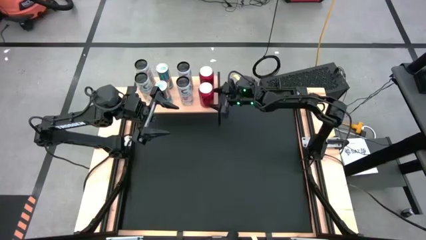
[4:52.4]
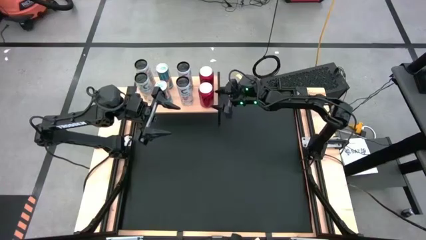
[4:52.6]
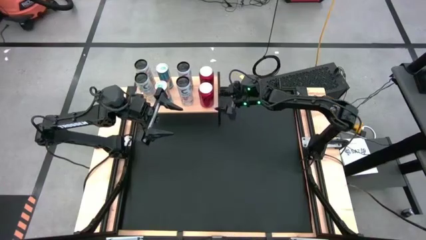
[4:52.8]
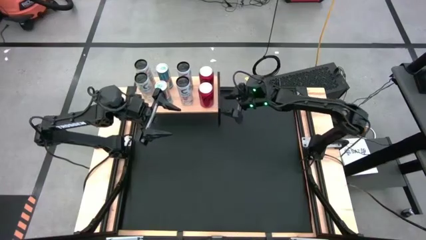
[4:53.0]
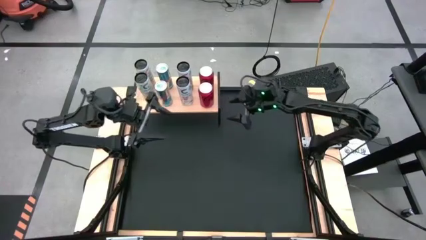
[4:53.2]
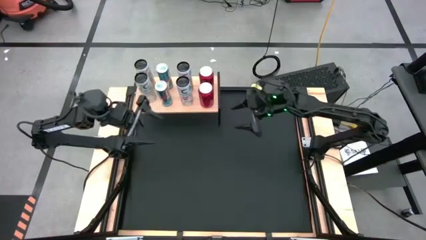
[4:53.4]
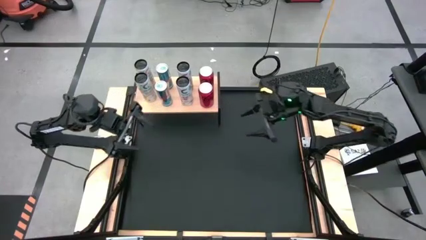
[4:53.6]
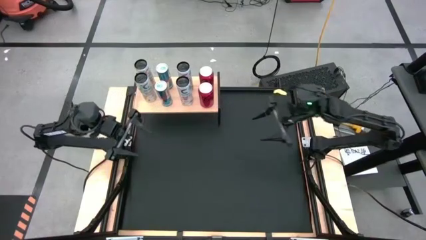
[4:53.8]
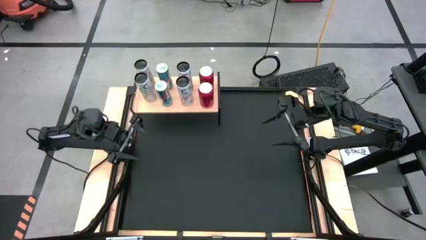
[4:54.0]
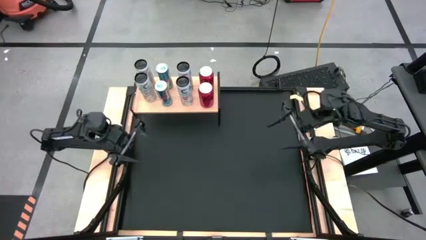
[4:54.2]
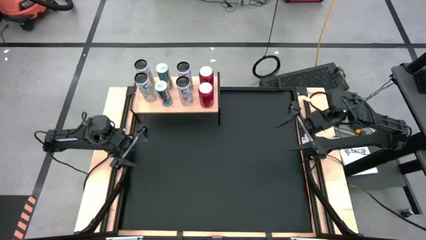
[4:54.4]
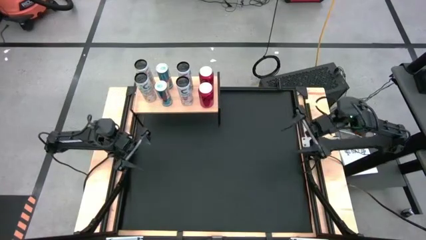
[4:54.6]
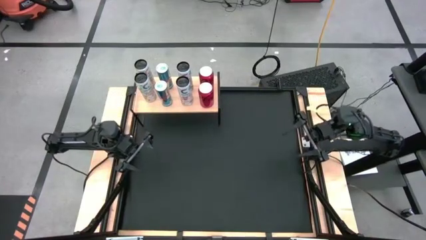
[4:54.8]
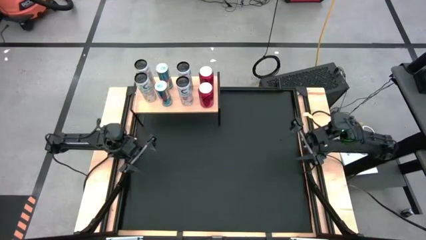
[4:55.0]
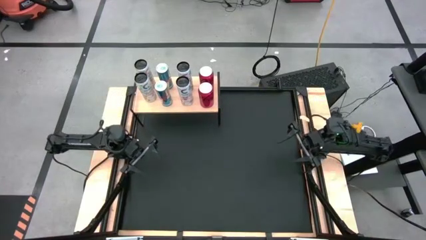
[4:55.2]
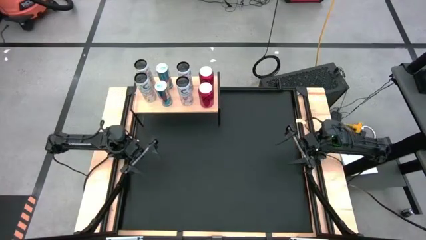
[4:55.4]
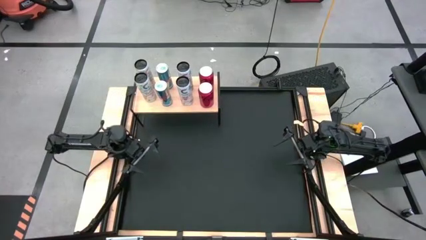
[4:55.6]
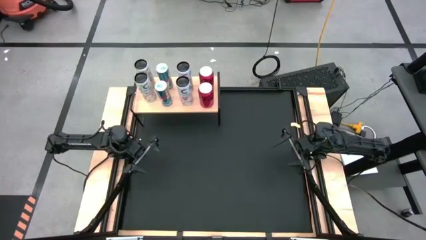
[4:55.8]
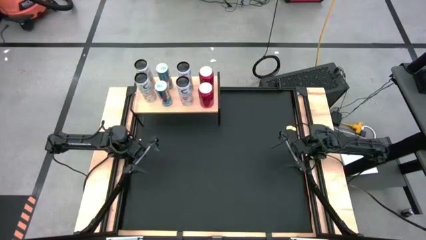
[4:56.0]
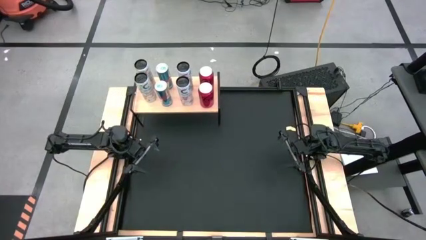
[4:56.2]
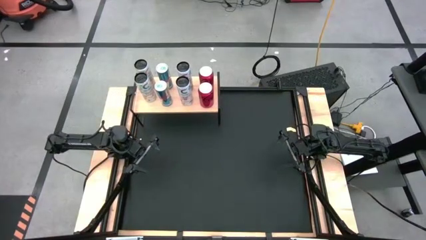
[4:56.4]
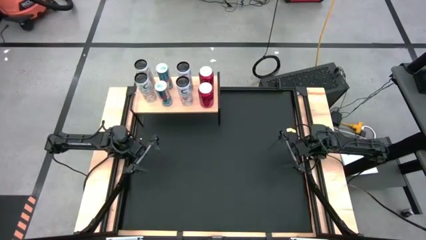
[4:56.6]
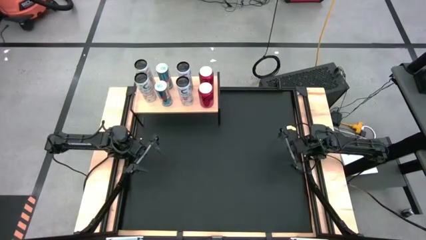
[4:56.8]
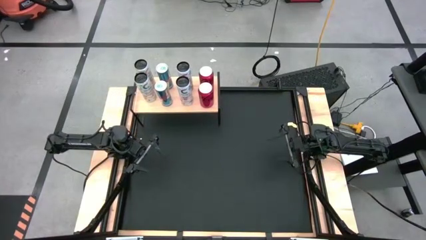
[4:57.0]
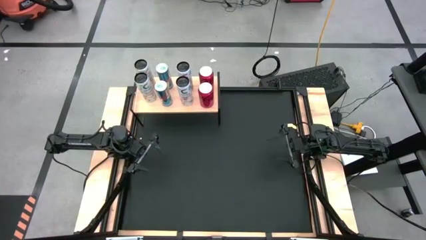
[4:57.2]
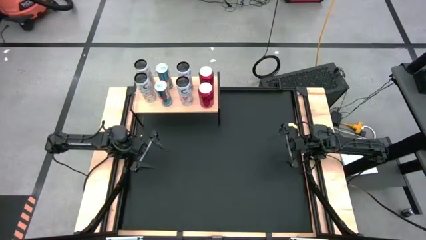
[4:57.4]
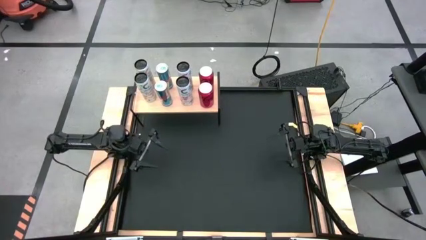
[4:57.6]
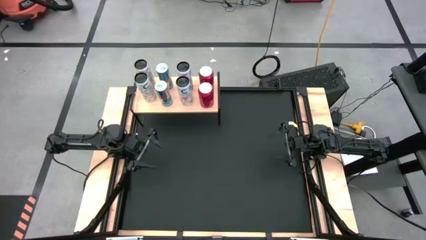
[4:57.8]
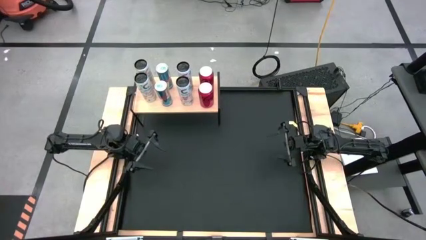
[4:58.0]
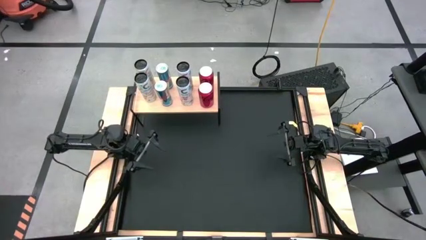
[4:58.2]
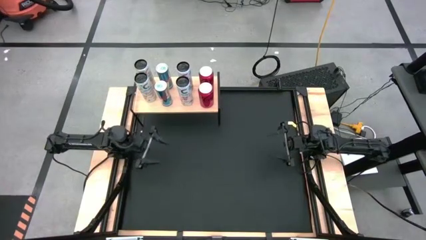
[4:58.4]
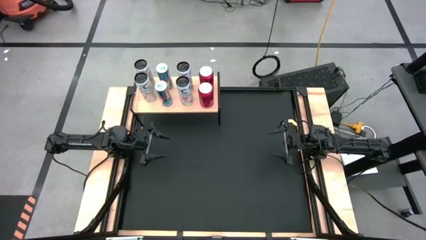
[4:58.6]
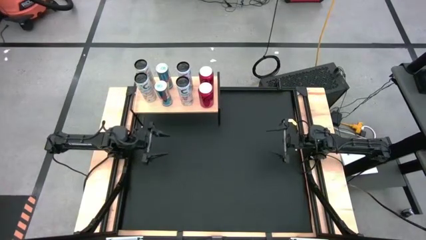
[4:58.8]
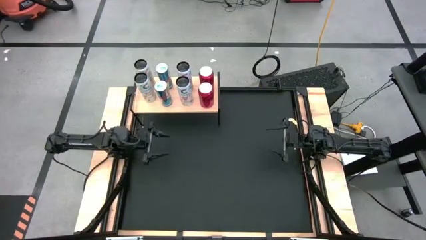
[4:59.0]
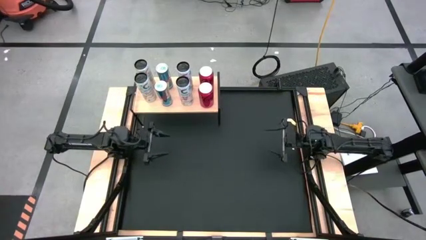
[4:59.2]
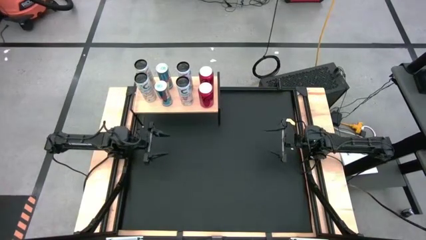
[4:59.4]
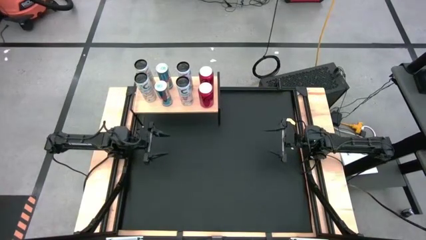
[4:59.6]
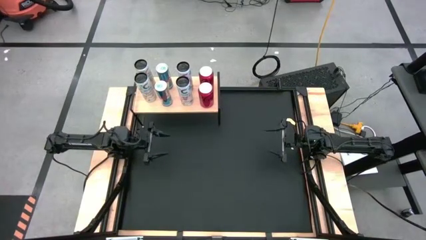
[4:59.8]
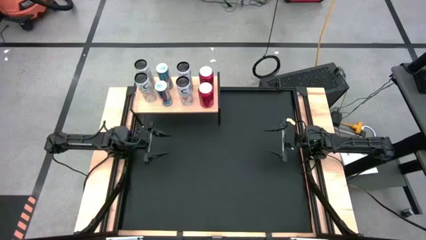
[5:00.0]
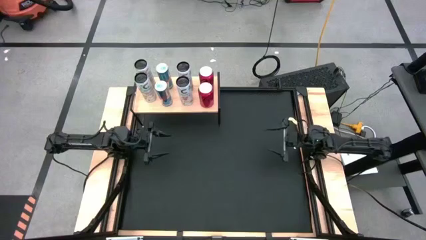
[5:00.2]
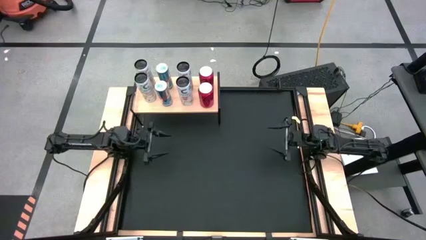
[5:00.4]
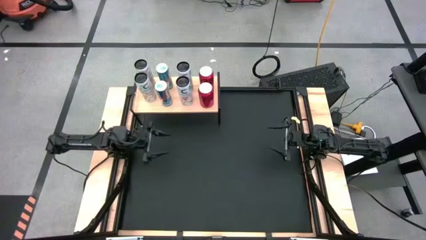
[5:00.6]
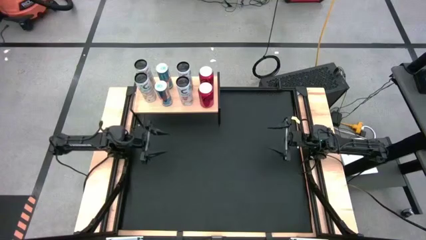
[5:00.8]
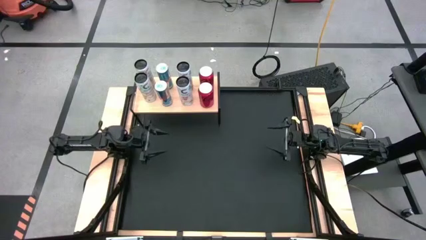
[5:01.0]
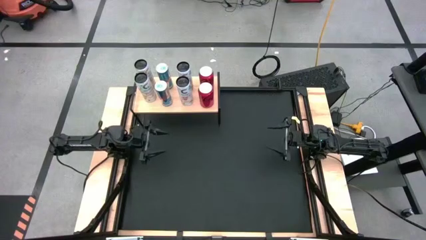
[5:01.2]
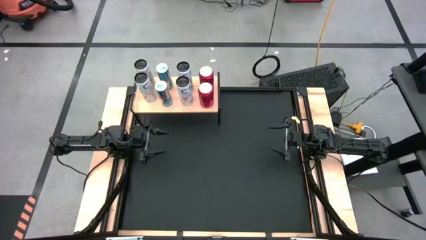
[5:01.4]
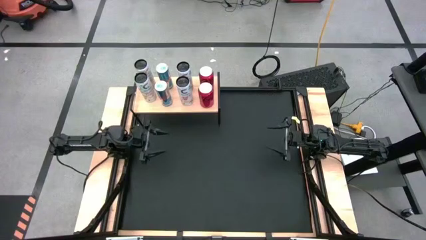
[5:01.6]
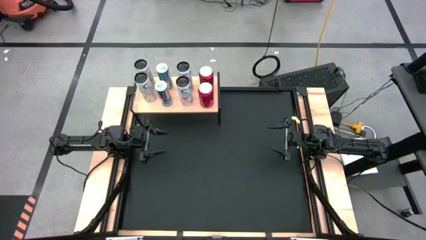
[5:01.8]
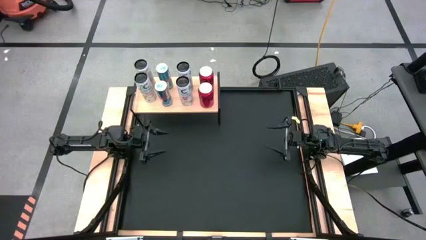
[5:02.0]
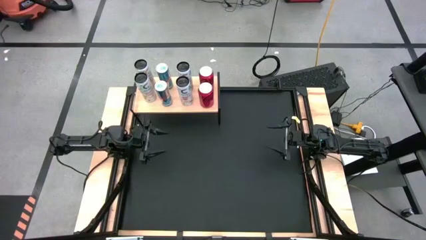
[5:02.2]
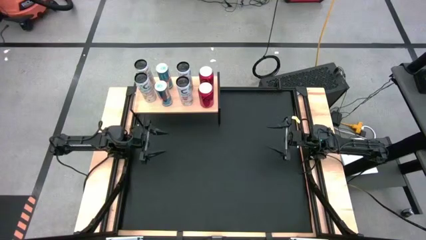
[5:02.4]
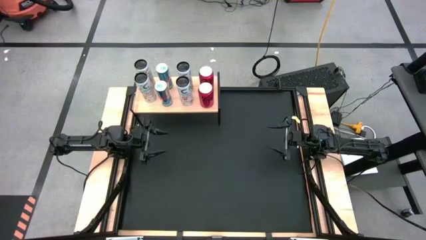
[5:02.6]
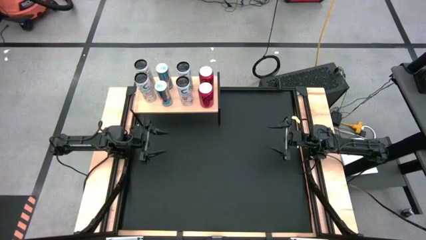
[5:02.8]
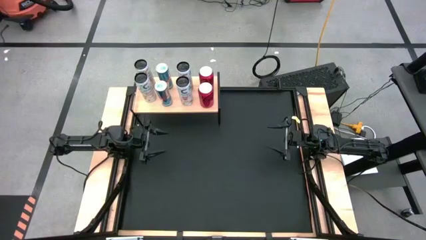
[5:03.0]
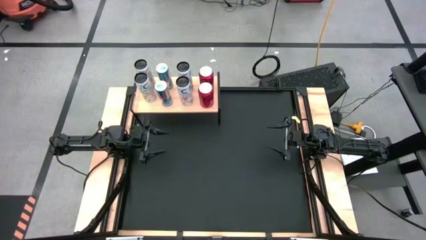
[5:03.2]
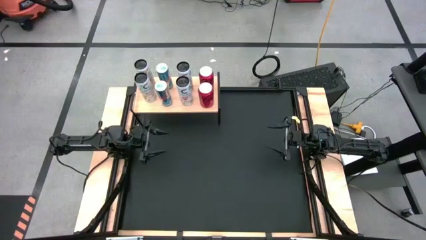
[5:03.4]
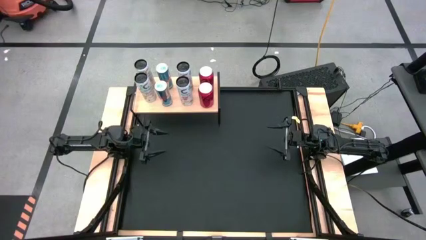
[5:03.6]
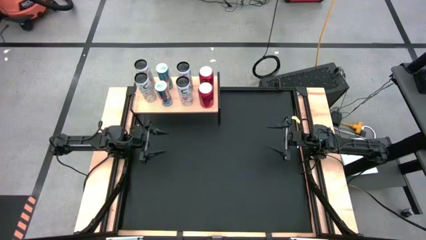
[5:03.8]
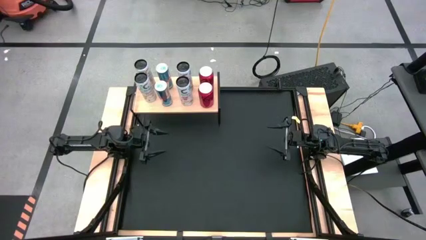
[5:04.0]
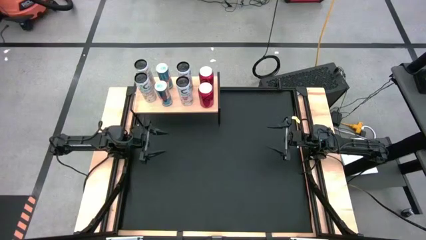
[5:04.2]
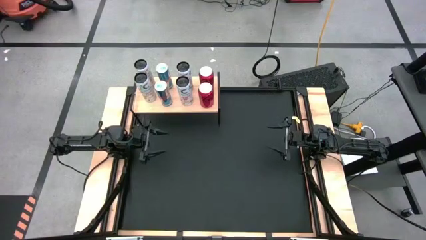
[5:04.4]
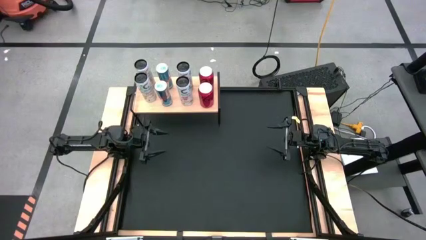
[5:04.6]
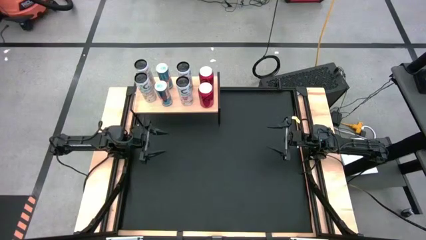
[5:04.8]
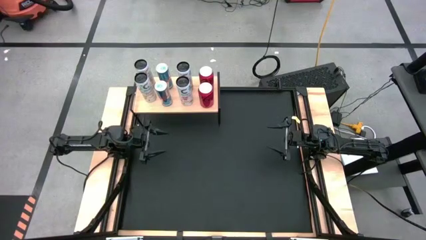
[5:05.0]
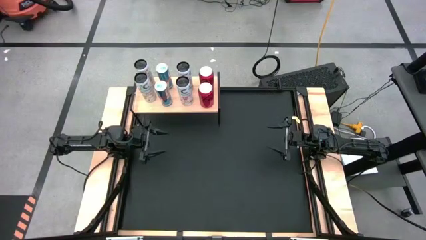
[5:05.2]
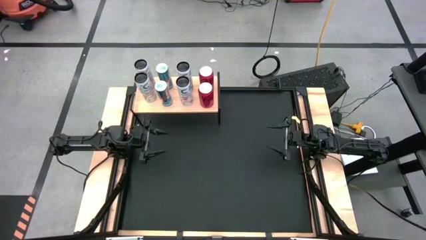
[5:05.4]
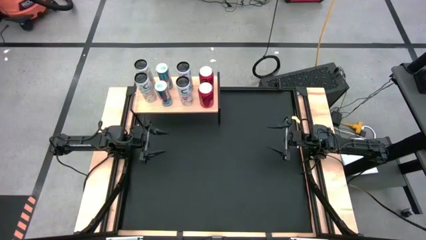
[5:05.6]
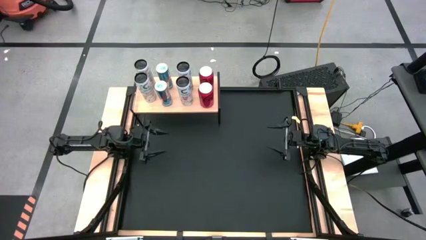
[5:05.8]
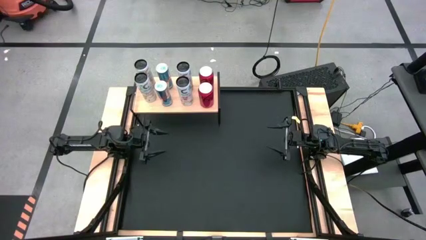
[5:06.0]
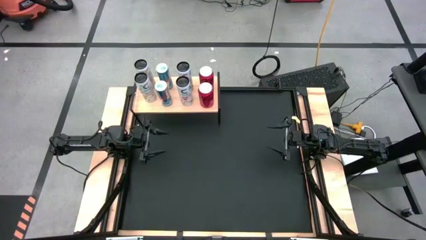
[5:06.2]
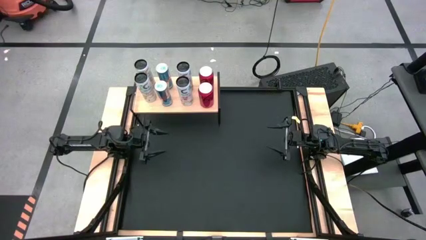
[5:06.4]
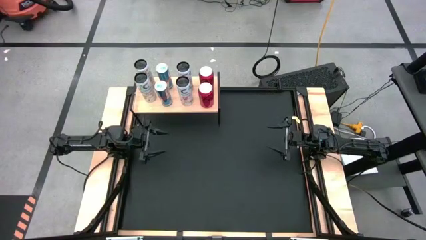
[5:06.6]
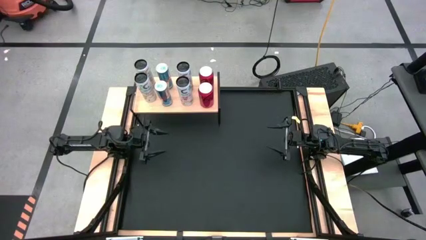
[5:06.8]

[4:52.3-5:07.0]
Task: Place canned beverage on shelf
Return to Home Position

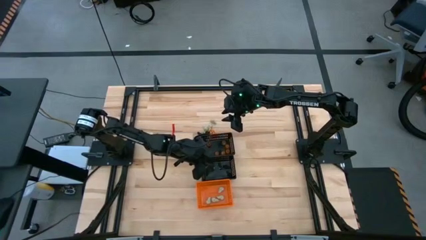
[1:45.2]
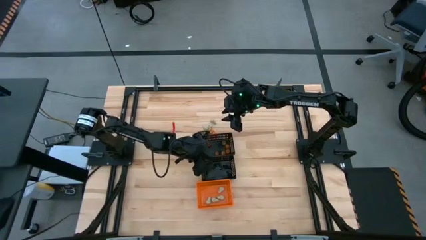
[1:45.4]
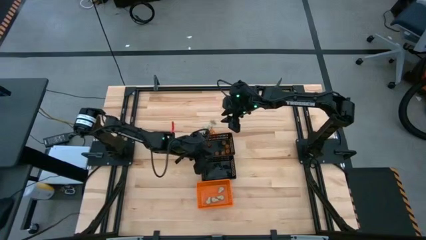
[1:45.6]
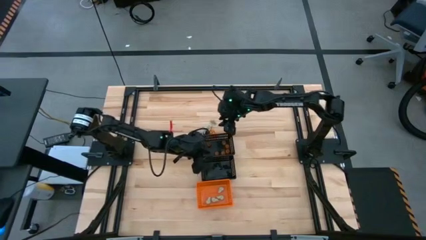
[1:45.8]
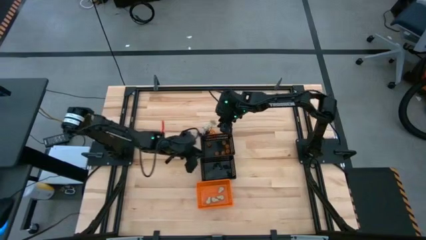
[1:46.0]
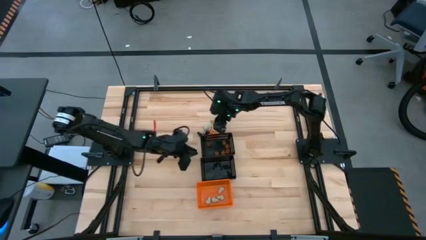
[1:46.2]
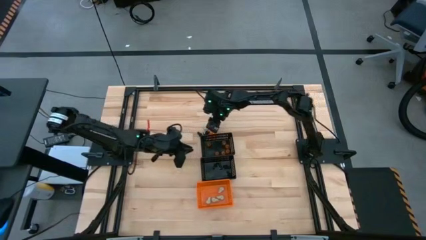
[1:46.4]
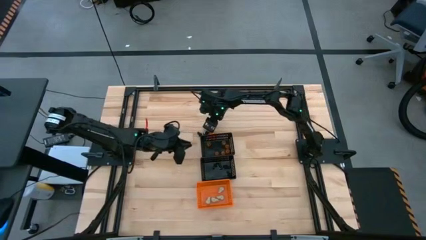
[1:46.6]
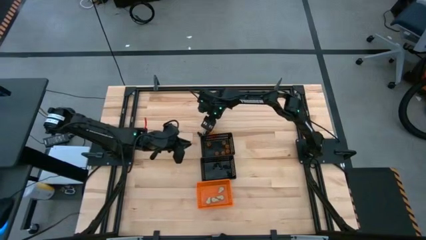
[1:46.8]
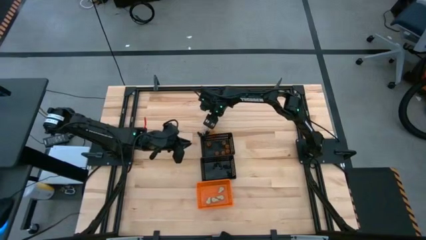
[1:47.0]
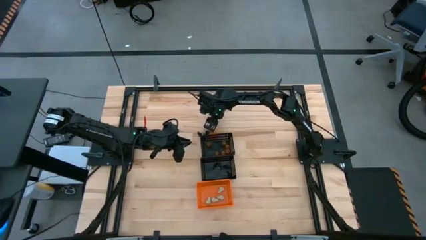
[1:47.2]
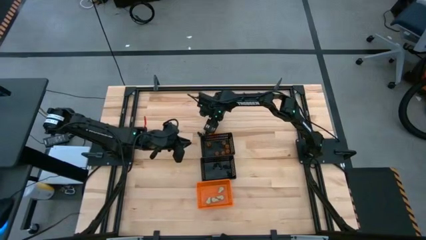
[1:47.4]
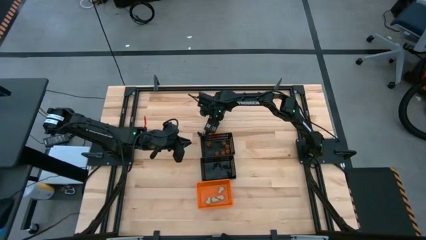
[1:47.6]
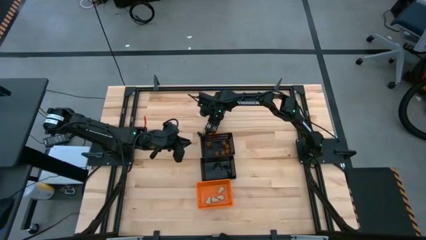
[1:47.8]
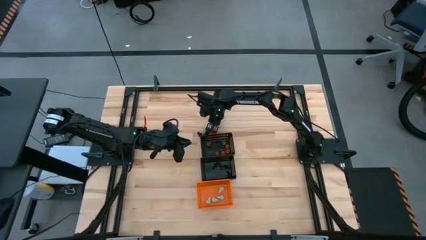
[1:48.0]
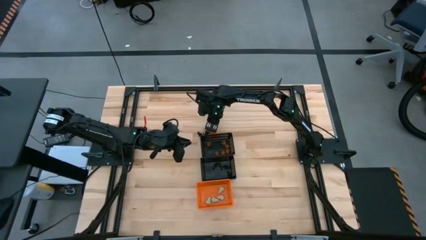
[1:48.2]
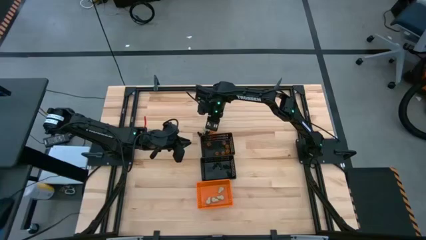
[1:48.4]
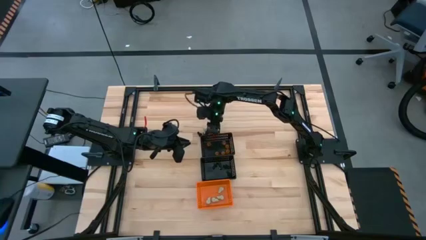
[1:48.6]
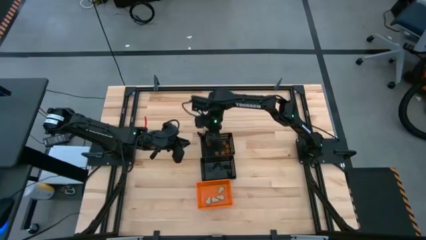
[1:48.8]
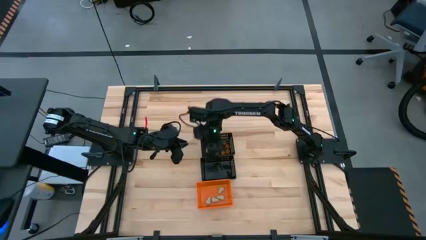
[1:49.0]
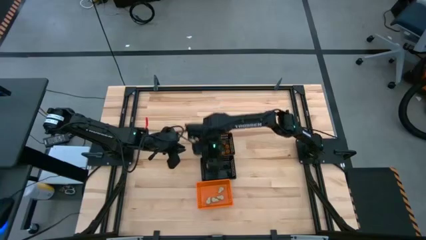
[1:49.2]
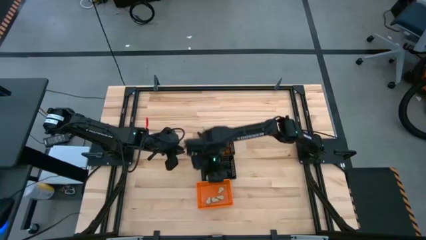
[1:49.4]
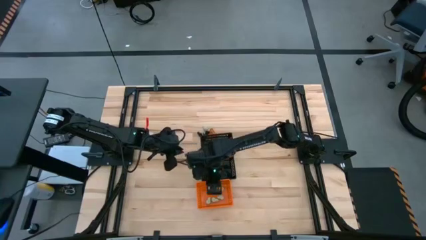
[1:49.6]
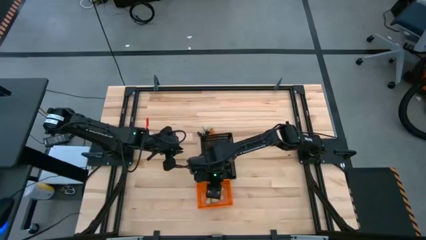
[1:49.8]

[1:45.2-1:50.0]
Task: Sort Halloween decoration
Put the white skull toy into the orange bin
